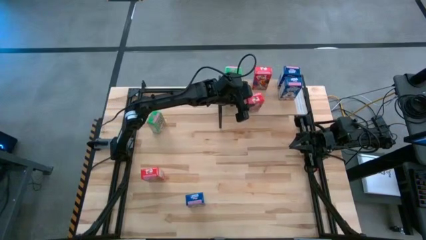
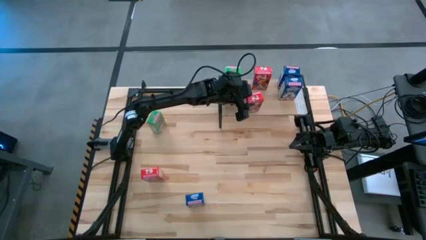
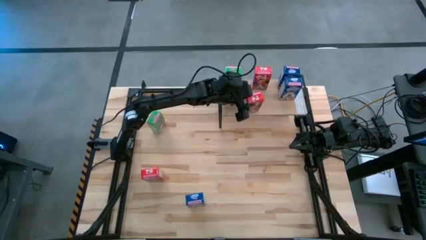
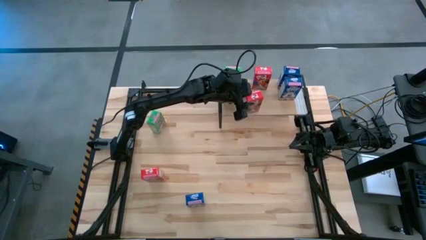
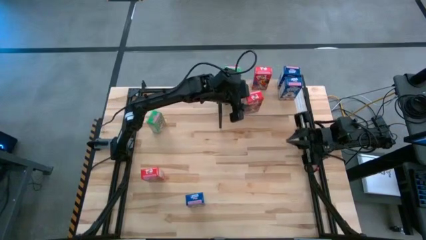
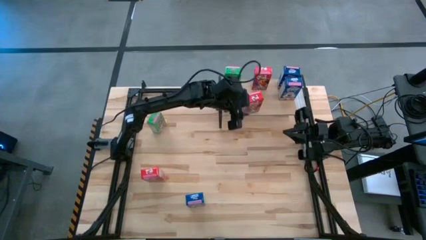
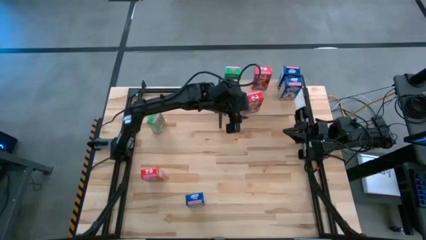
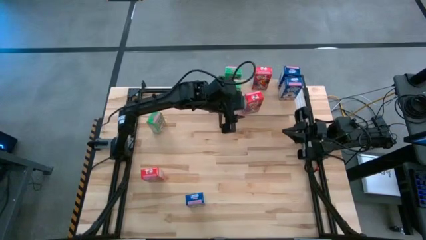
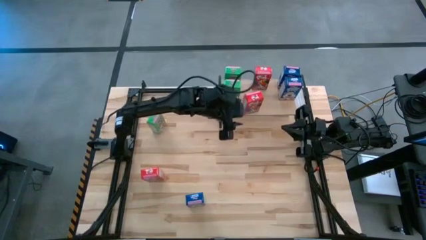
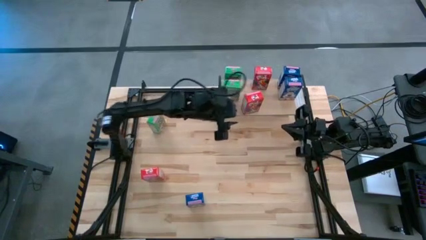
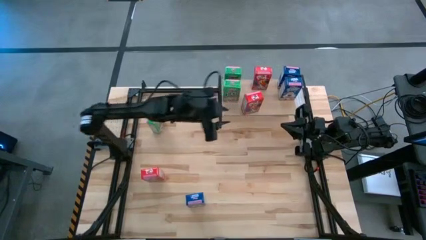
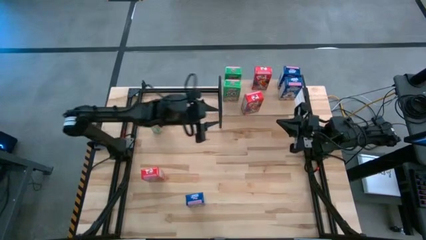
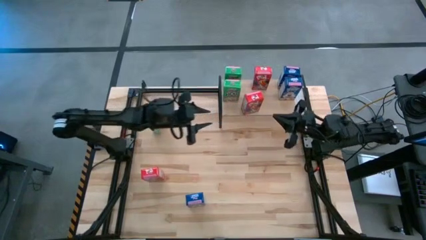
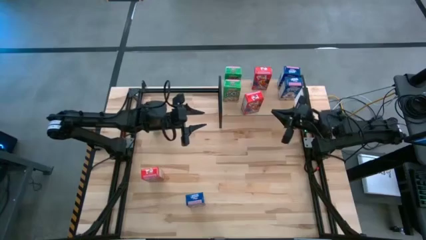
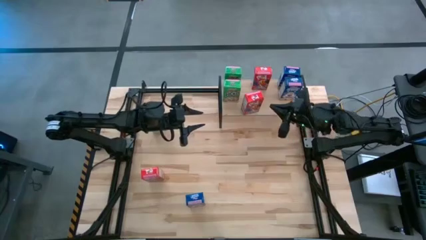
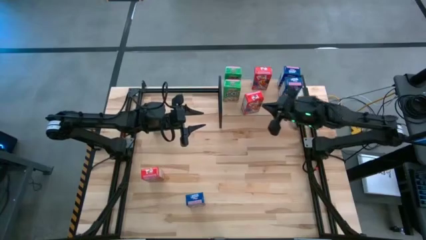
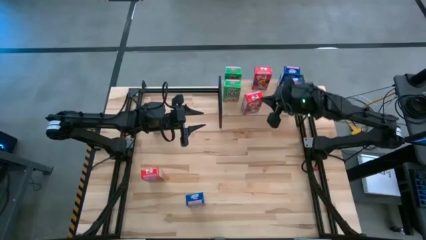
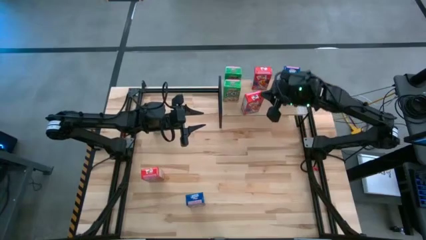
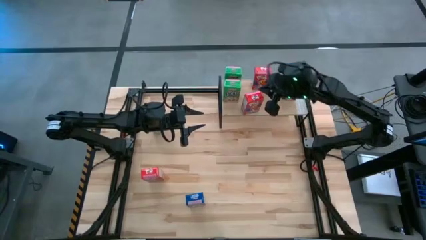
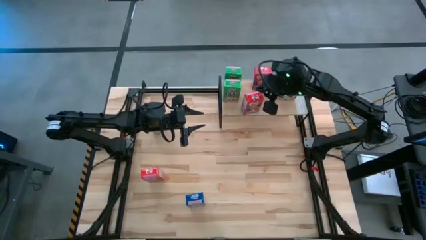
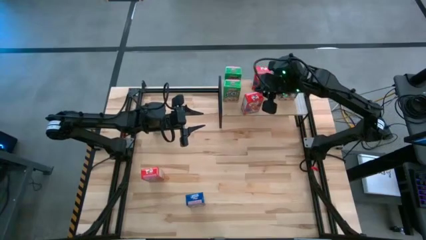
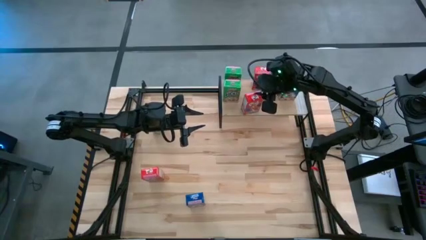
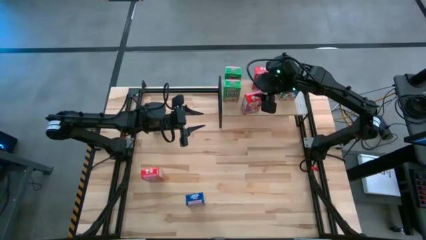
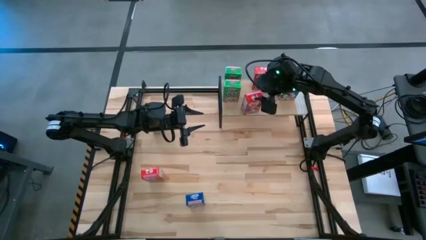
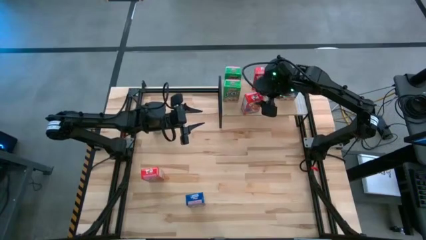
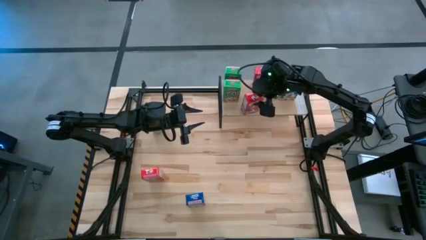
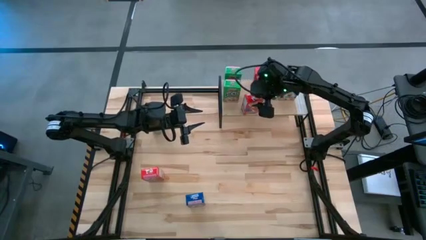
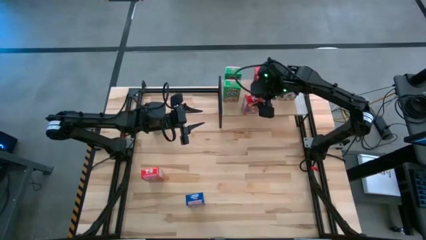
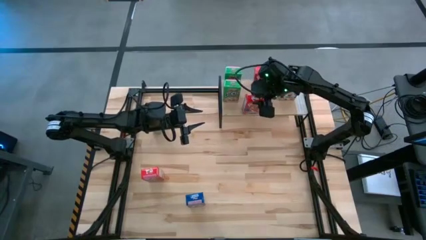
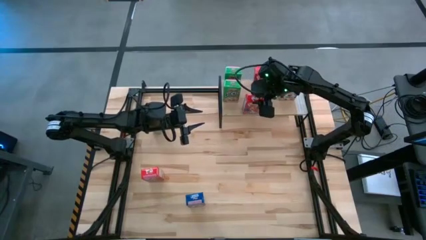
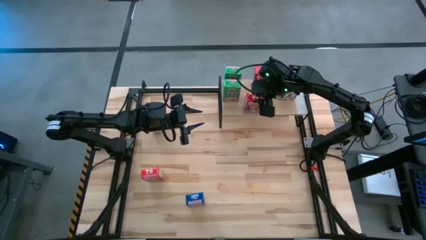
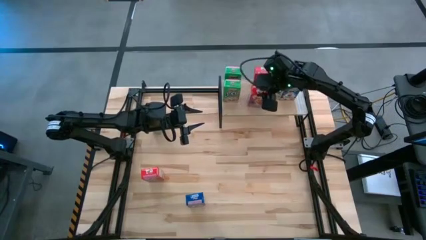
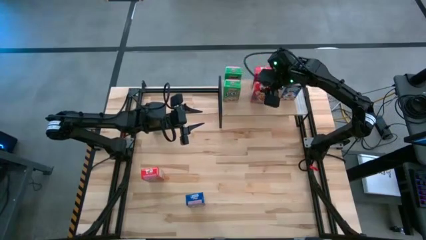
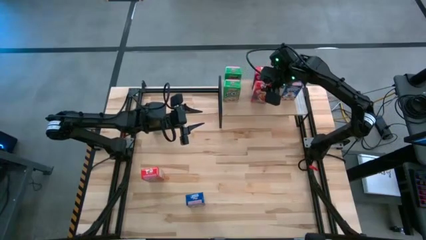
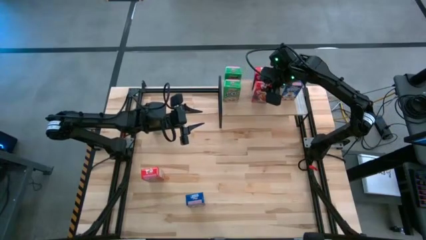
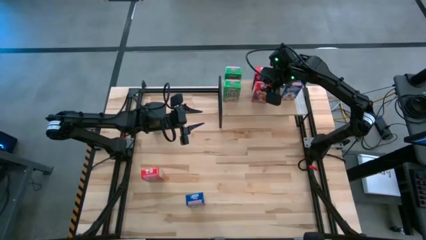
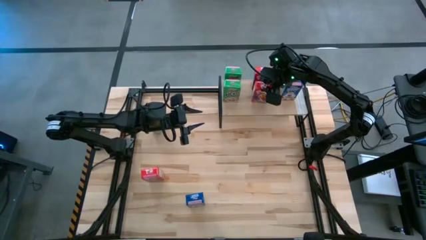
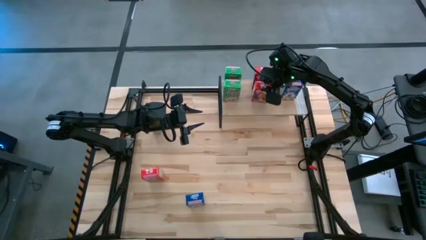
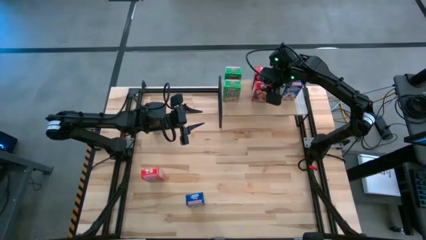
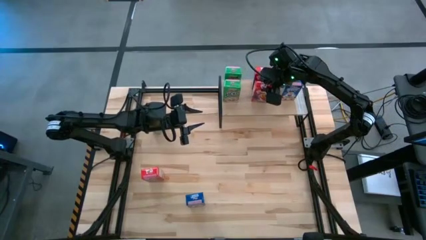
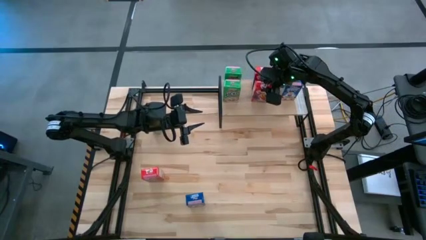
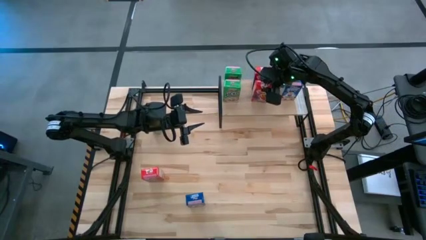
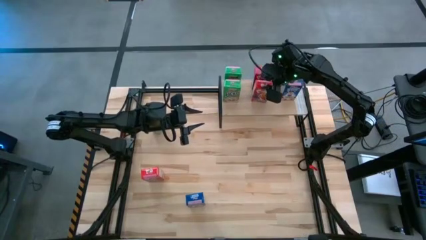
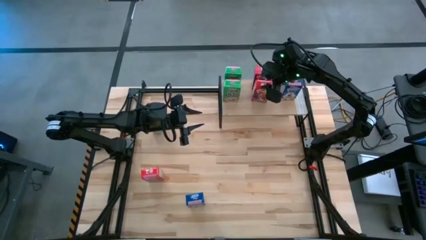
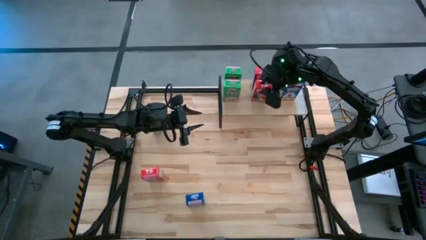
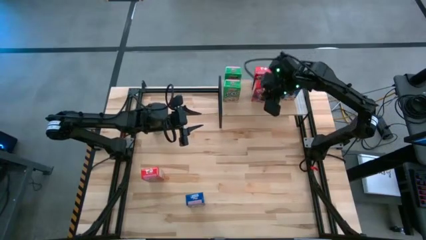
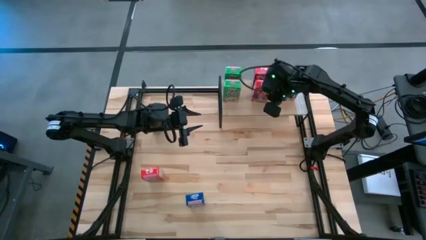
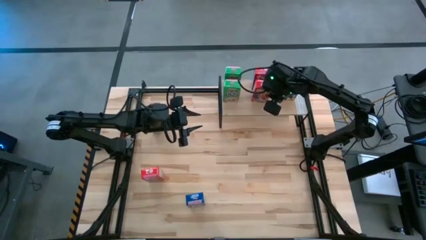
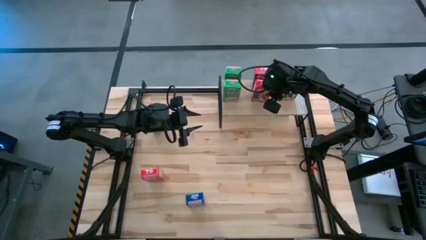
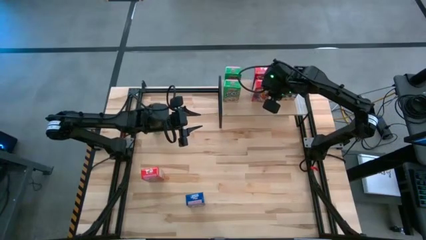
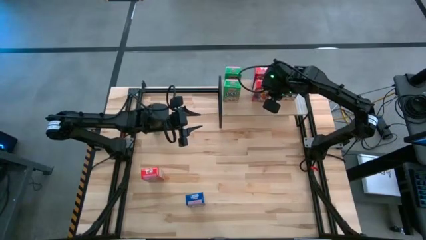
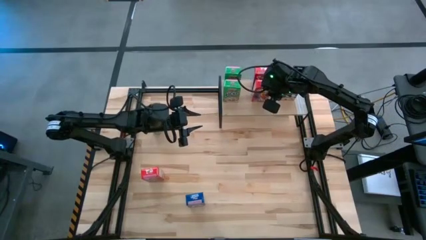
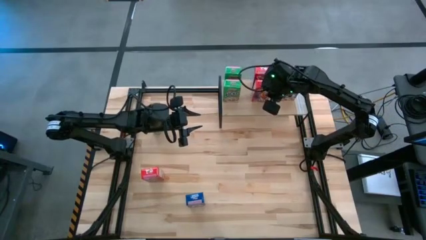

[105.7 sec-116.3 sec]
Task: Stack cereal on shelf
Put the top red cereal box on the shelf aligned with other red cereal boxes

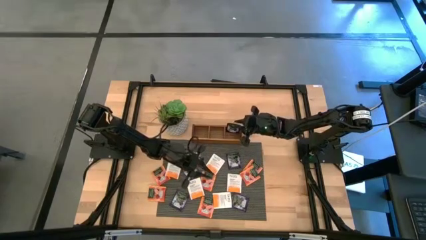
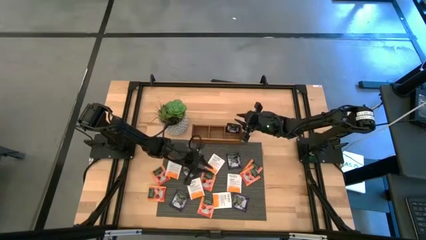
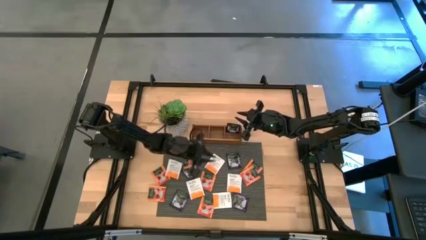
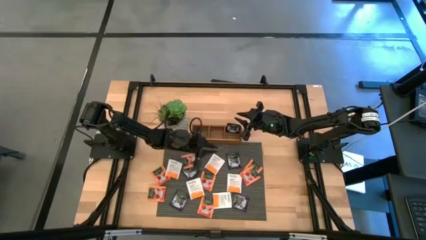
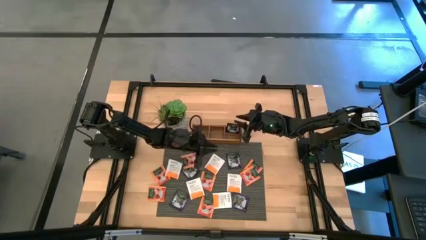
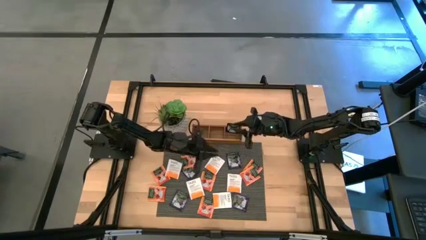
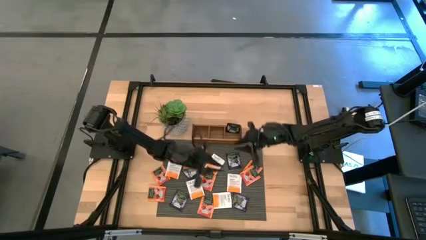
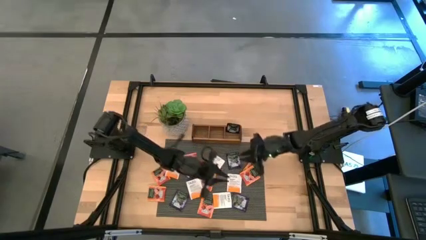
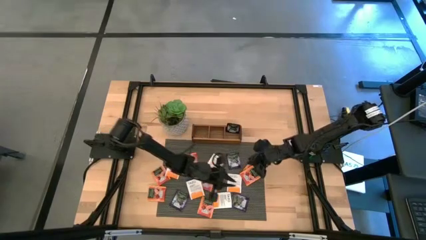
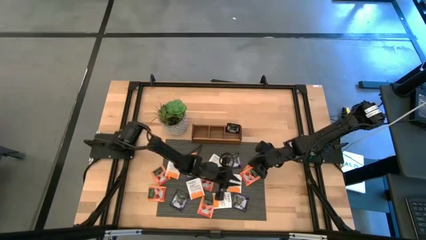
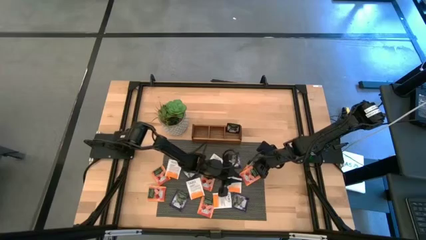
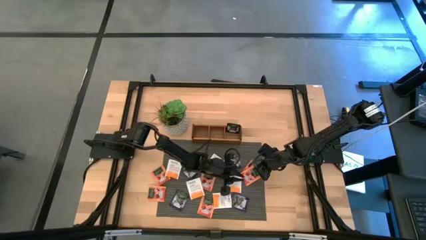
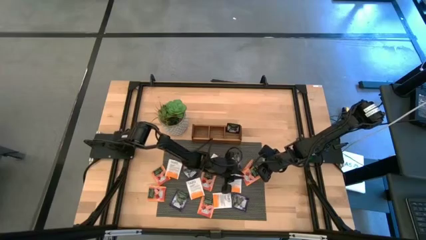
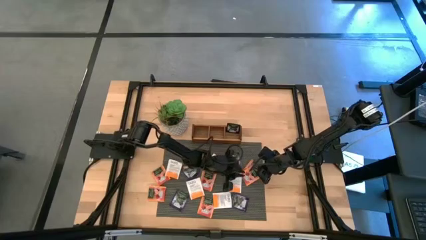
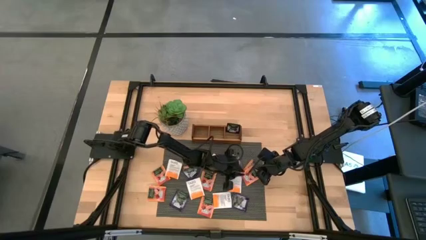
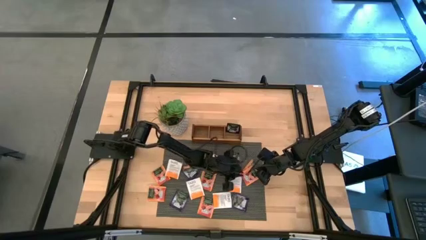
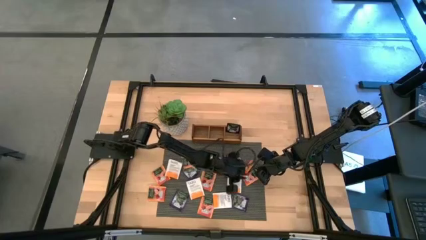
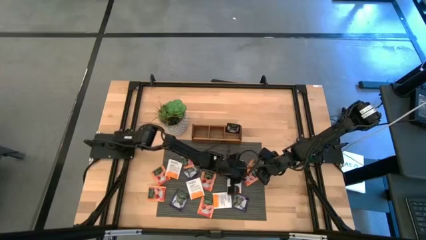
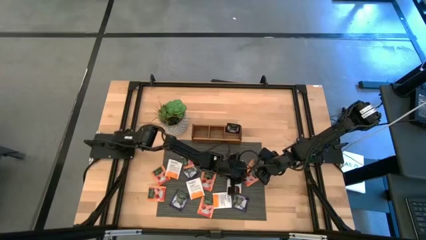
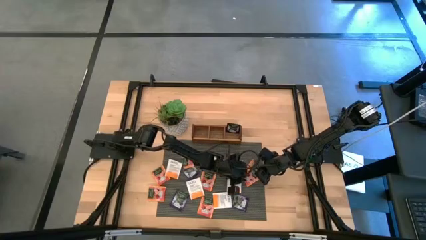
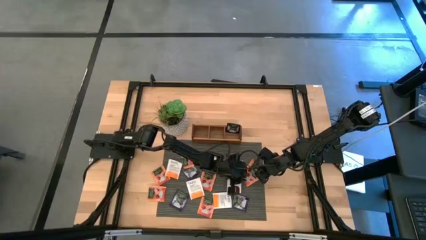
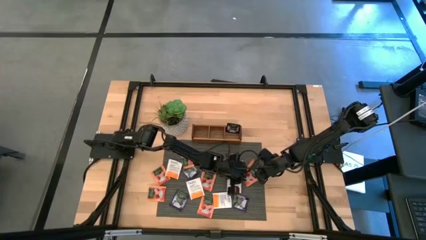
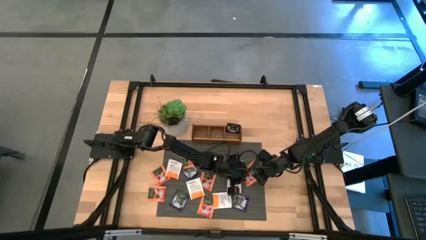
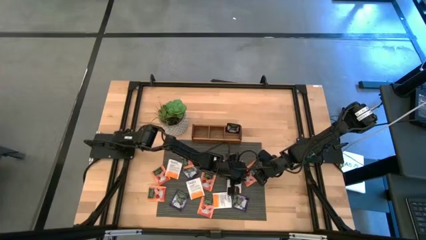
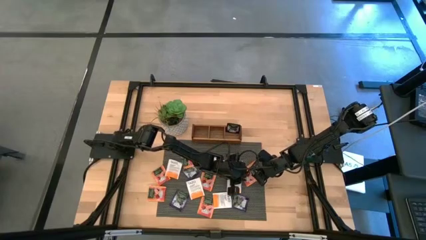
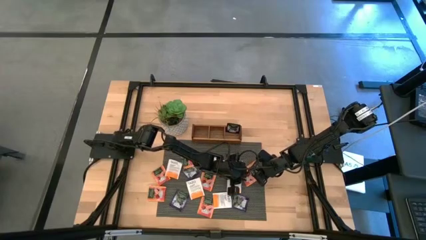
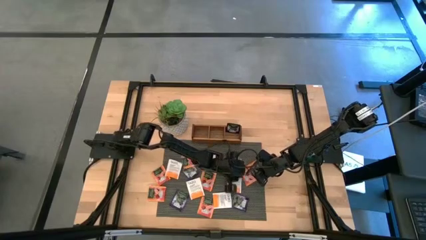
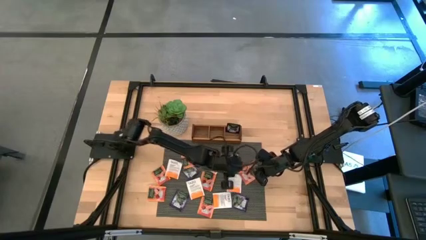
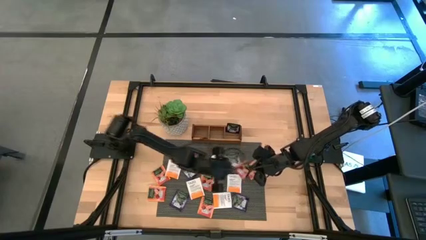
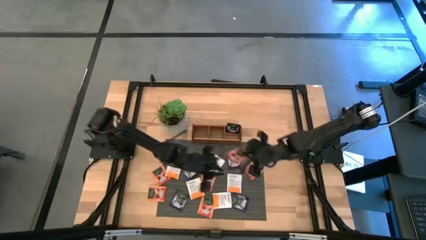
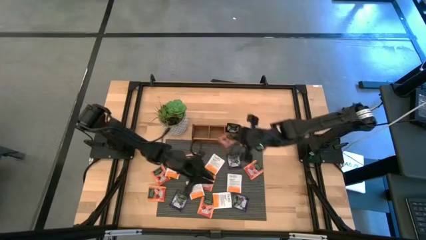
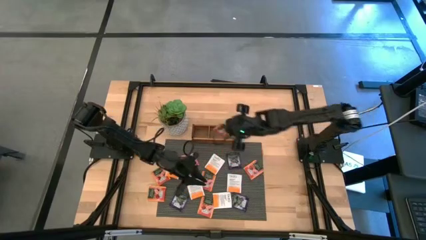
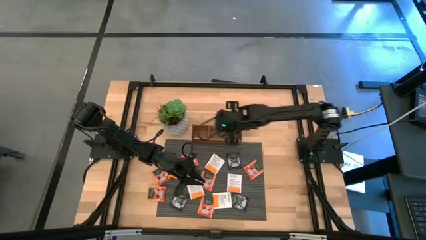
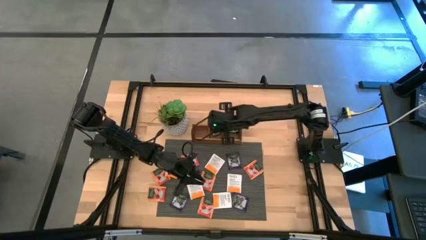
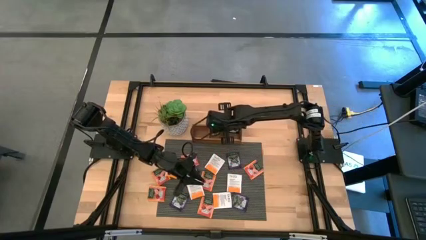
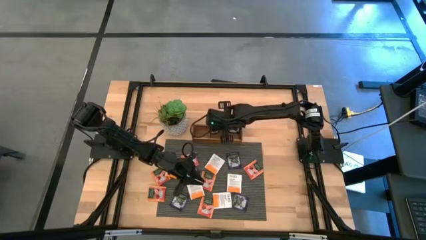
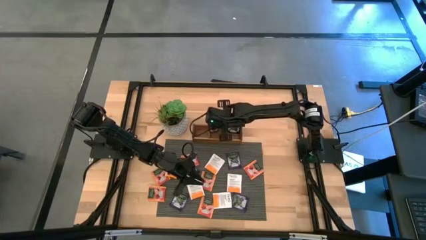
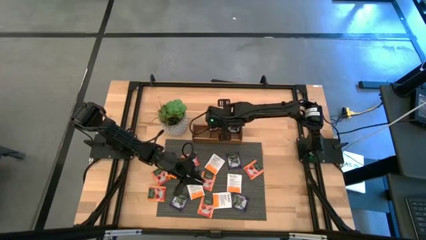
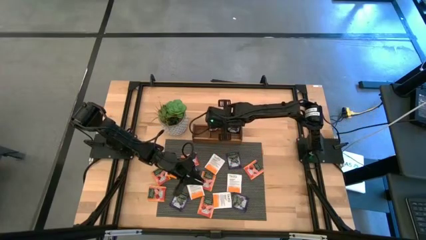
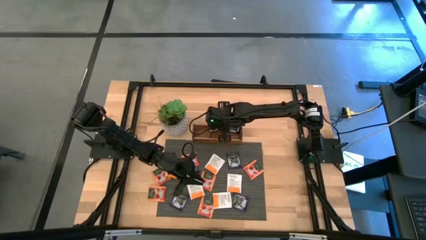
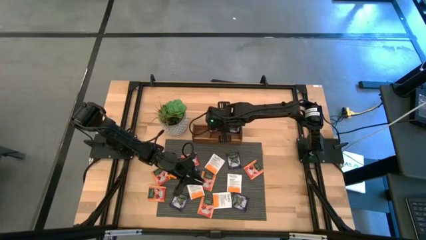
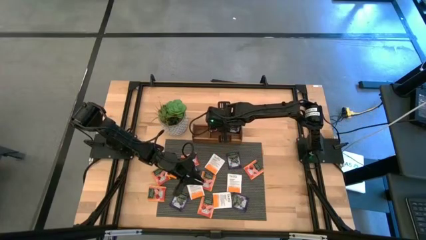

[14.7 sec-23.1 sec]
Task: Pick & Place Tea
Put the orange tea bag into the middle section of the wooden organizer
